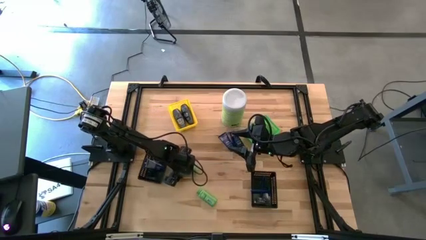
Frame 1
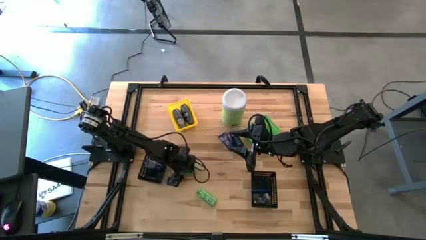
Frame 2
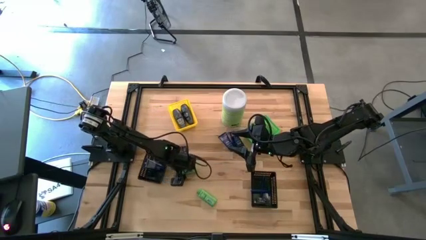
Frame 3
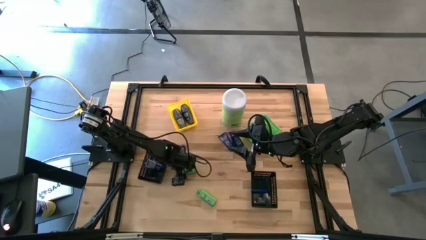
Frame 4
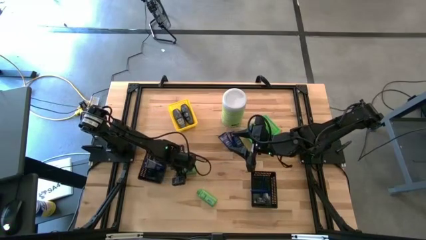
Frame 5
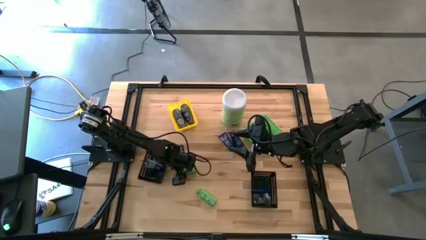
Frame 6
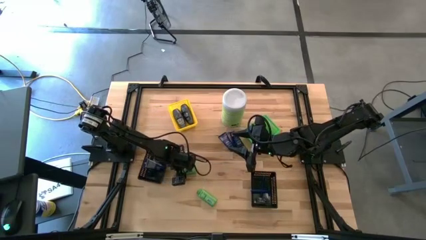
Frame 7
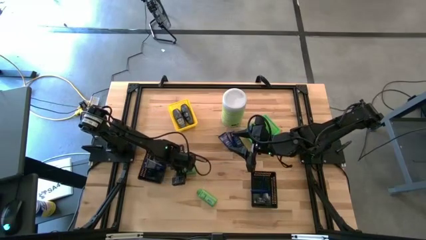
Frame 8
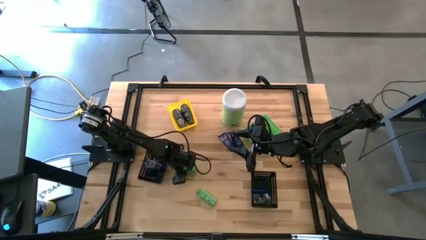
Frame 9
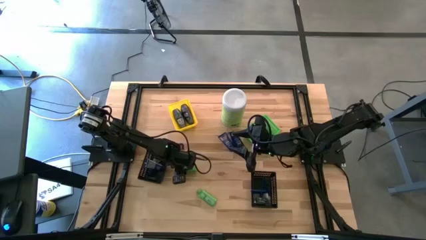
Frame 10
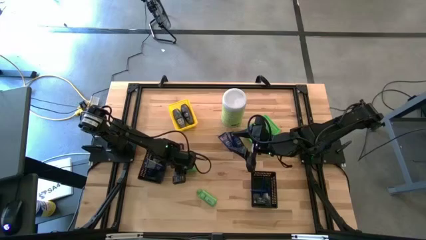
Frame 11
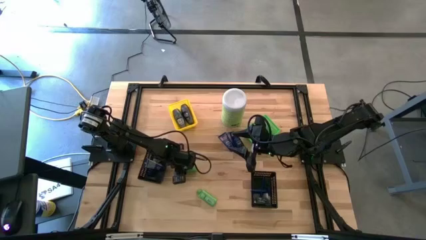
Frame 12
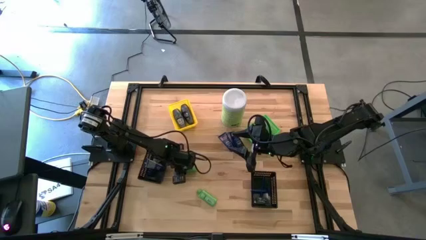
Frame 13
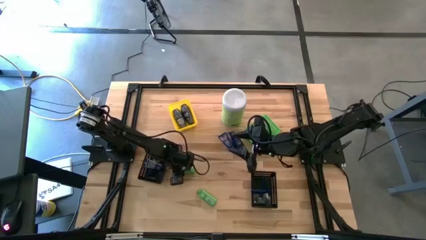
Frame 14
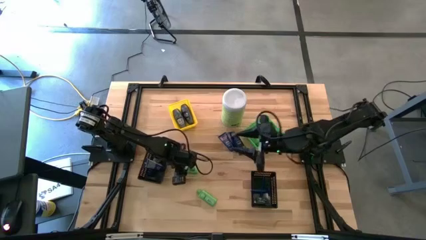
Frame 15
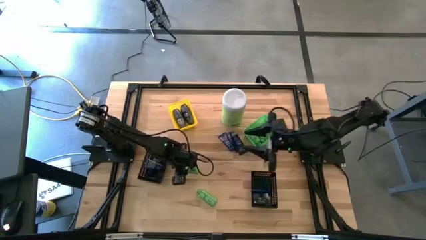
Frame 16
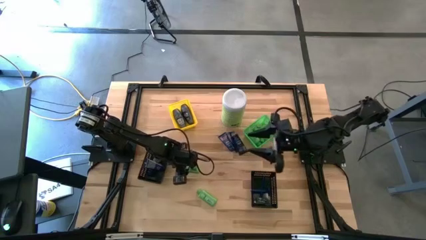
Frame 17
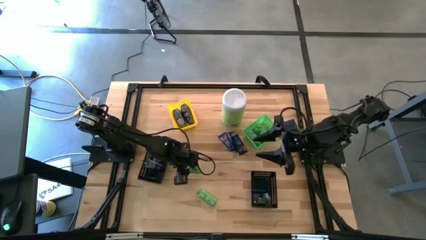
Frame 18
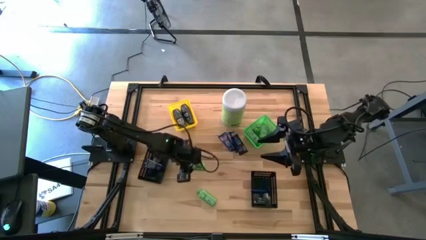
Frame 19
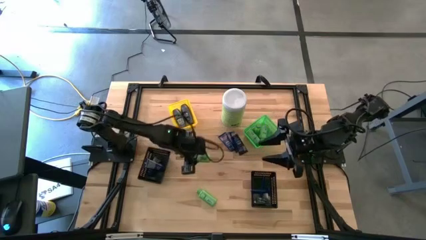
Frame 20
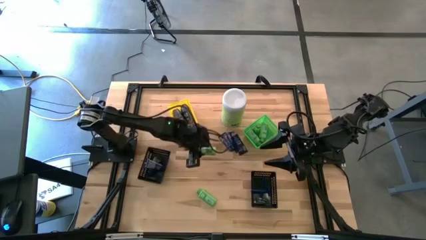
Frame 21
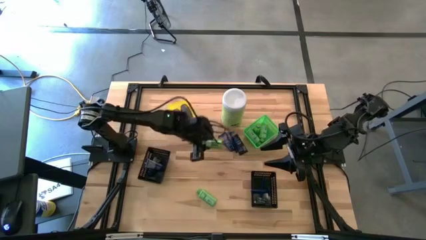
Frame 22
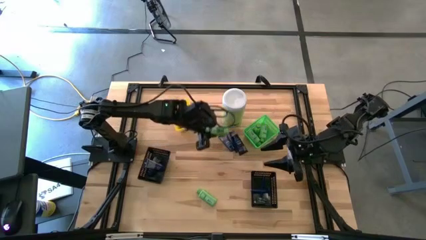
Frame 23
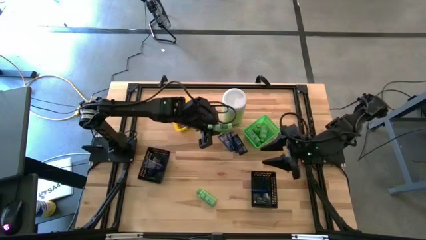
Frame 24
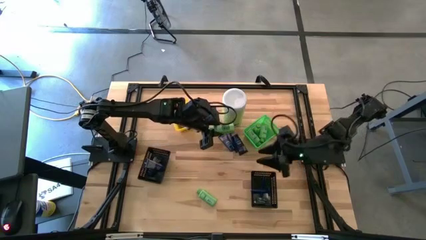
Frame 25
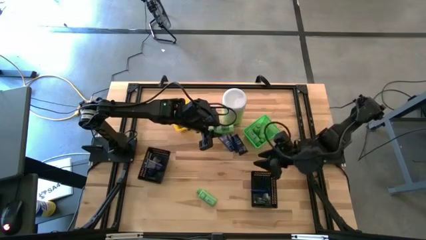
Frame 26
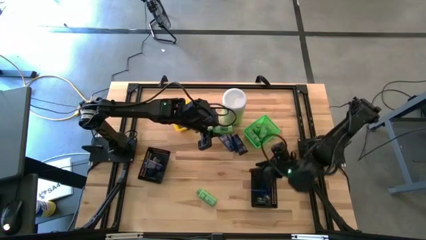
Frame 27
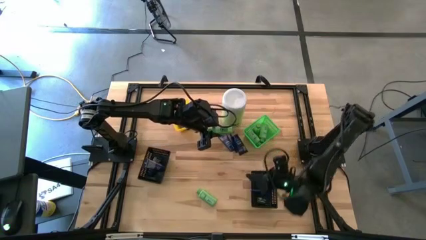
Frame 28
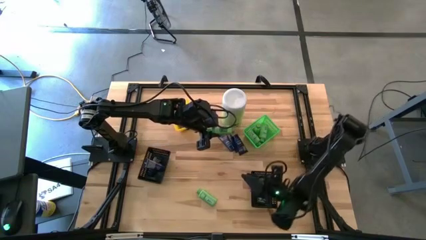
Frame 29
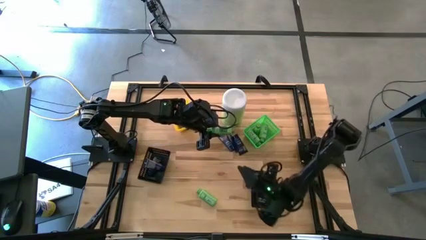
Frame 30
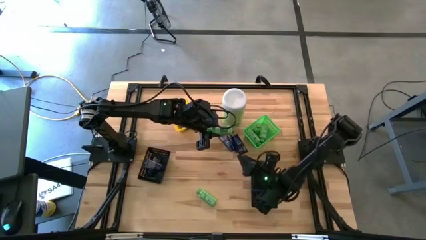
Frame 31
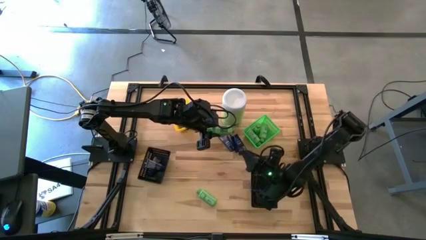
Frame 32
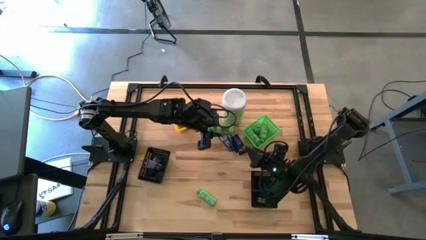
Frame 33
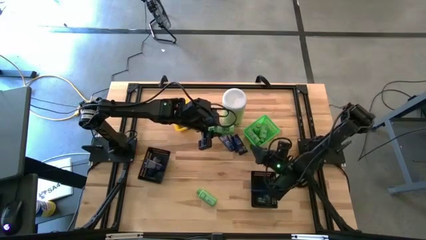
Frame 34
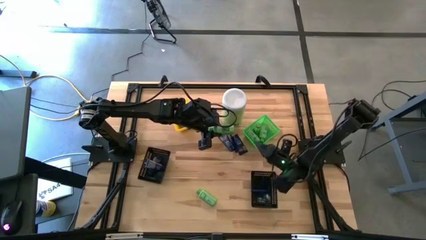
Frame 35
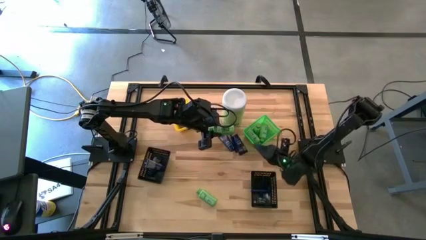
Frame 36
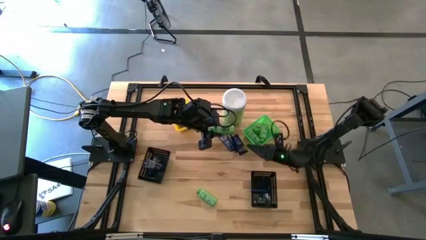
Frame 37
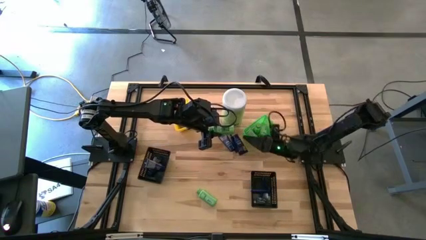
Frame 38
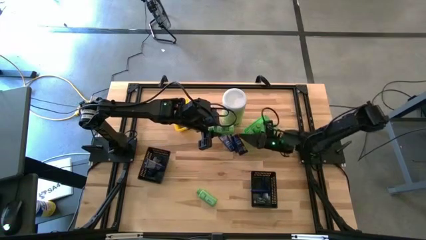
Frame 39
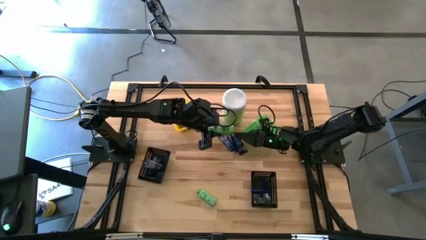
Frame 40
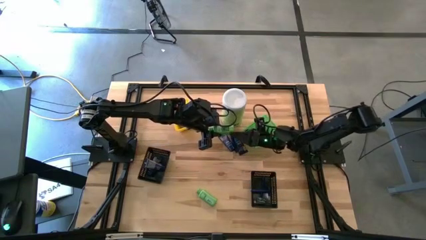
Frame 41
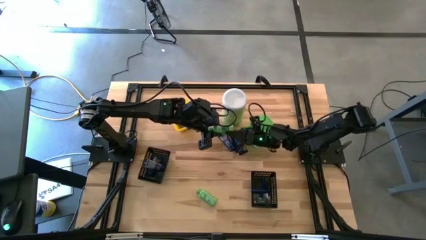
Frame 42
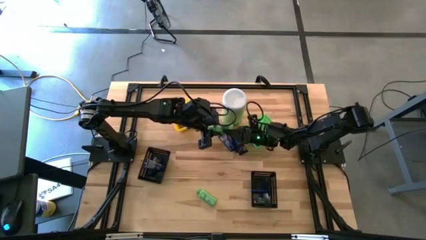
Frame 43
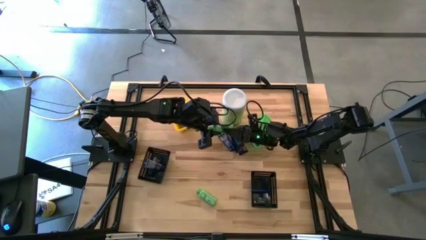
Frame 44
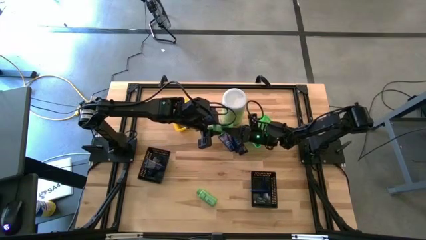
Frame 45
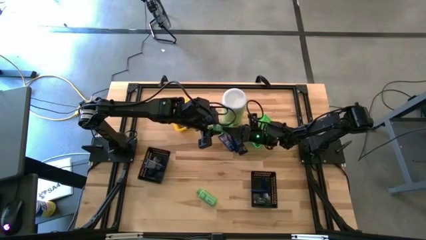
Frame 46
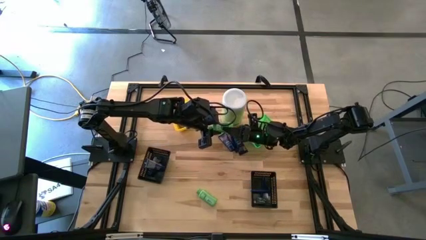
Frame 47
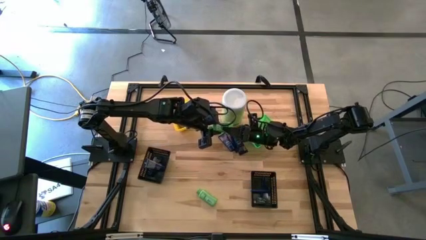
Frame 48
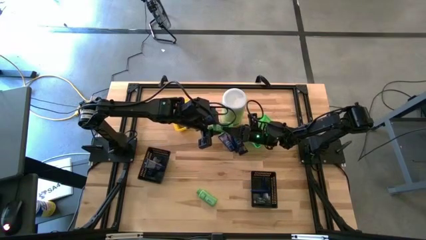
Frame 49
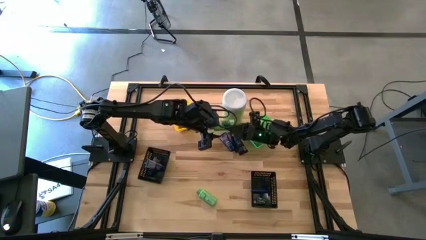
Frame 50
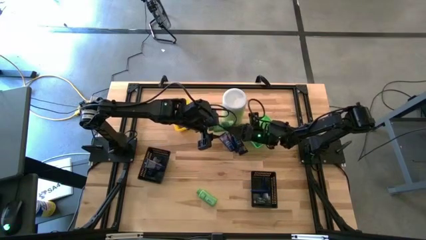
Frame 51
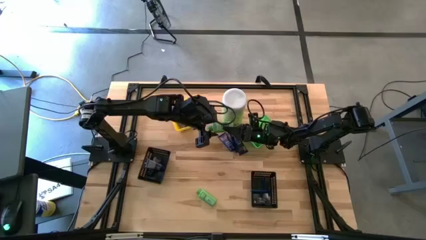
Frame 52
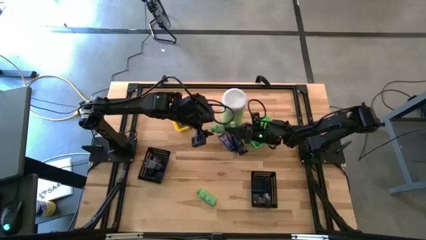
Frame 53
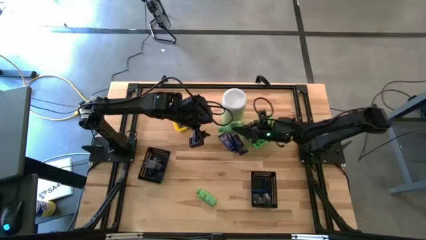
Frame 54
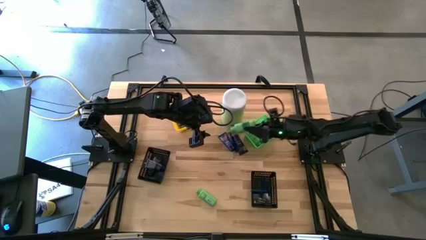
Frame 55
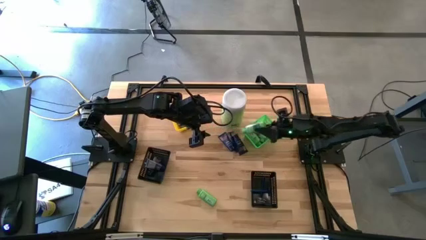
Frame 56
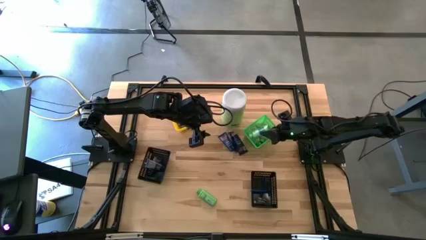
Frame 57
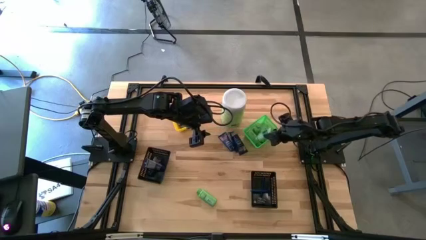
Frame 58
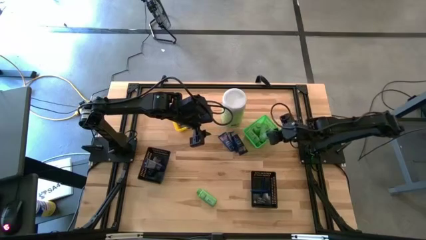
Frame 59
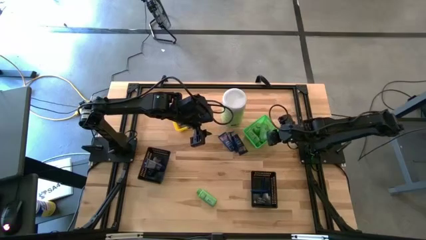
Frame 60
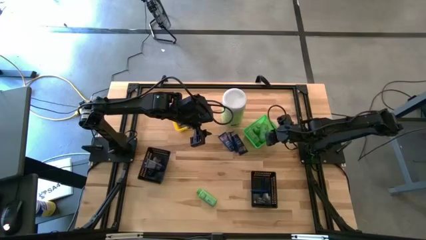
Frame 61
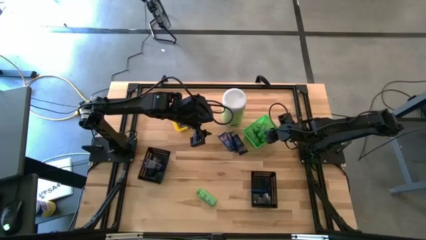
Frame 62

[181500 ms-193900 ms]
Task: Pick & Place Travel size toiletries
Put the shampoo bottle bottle into the green bin

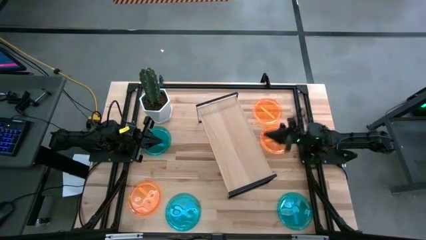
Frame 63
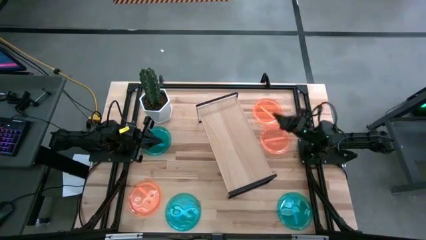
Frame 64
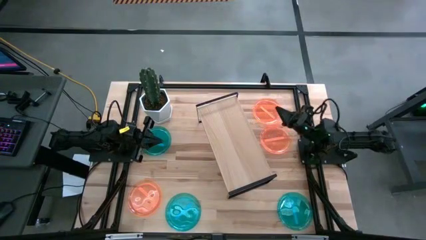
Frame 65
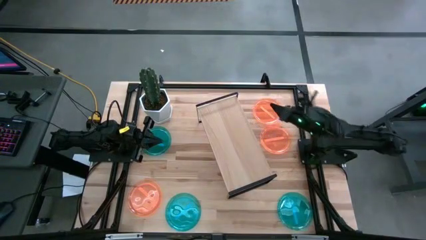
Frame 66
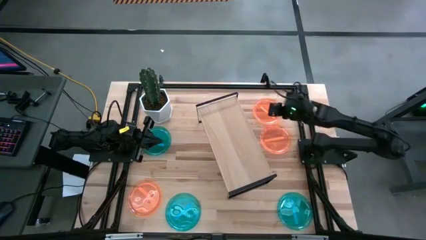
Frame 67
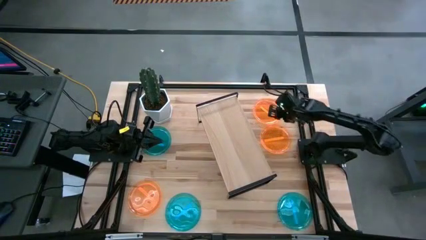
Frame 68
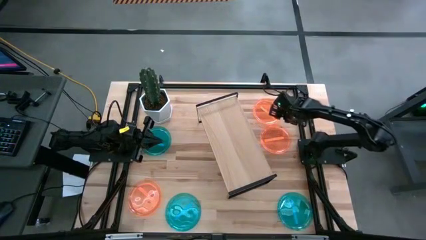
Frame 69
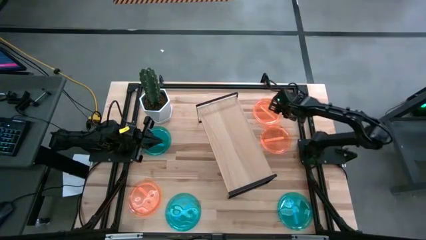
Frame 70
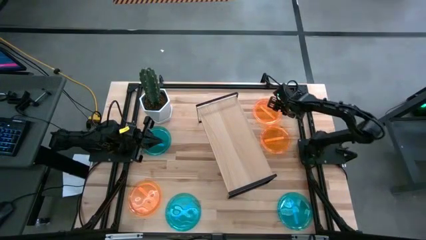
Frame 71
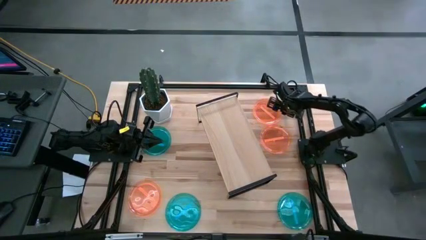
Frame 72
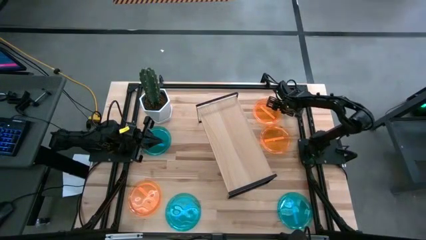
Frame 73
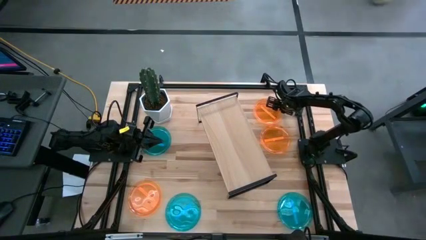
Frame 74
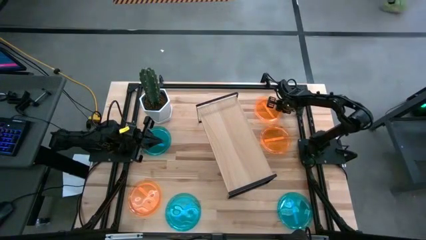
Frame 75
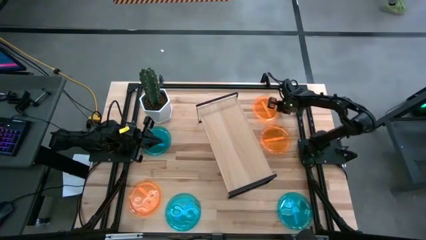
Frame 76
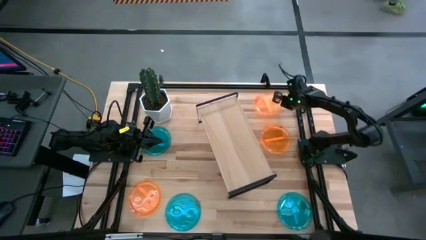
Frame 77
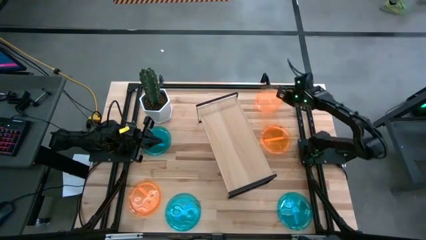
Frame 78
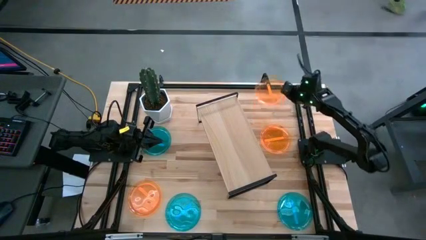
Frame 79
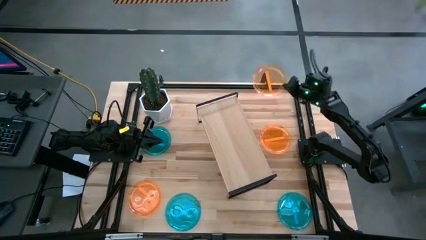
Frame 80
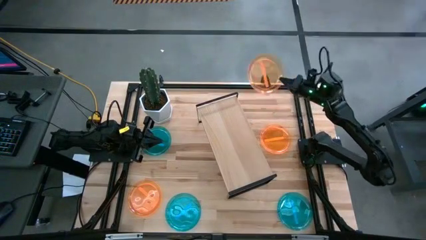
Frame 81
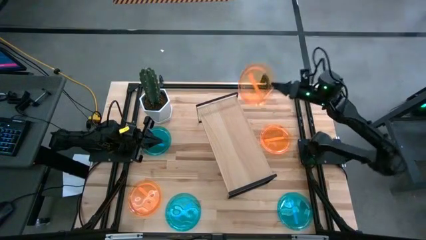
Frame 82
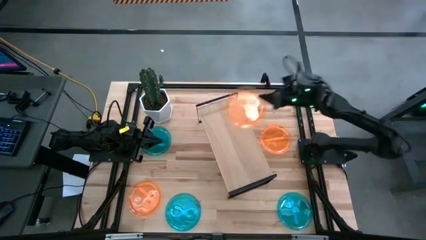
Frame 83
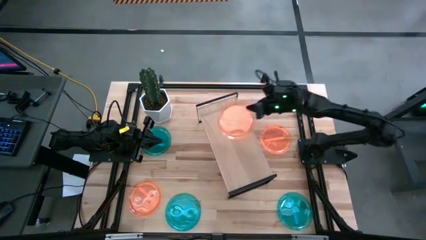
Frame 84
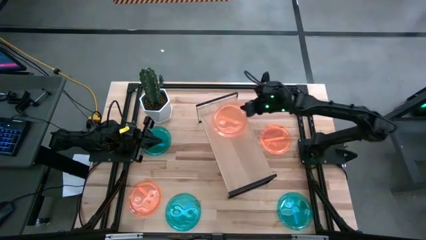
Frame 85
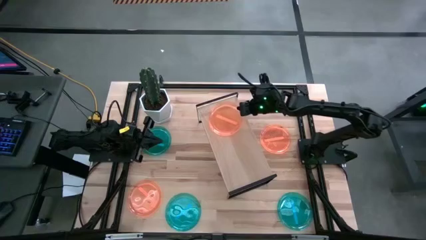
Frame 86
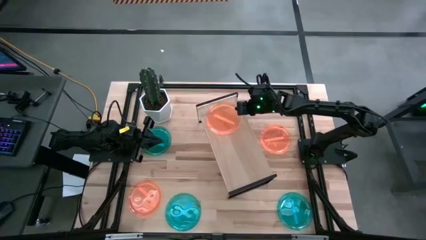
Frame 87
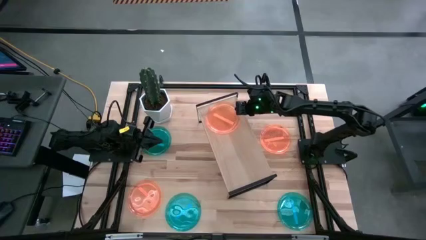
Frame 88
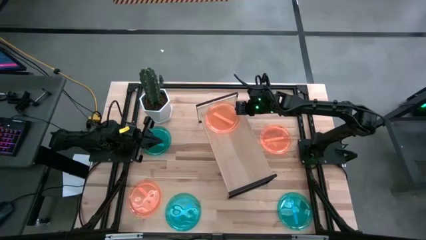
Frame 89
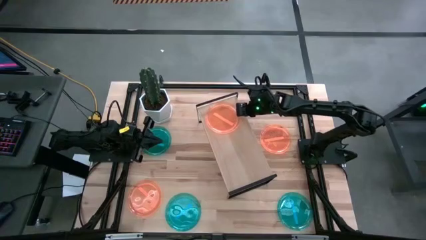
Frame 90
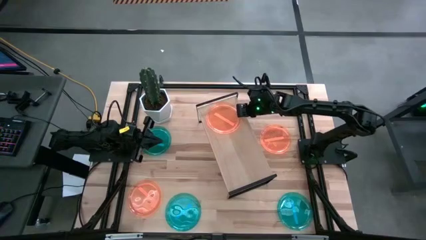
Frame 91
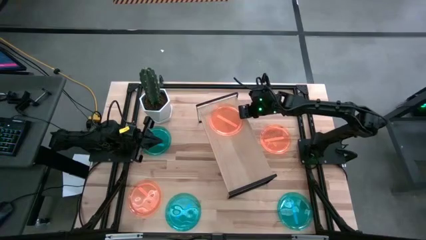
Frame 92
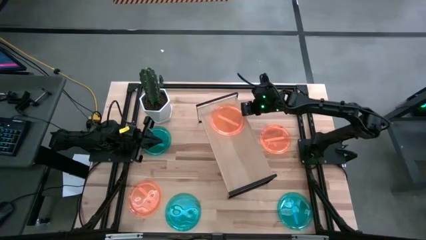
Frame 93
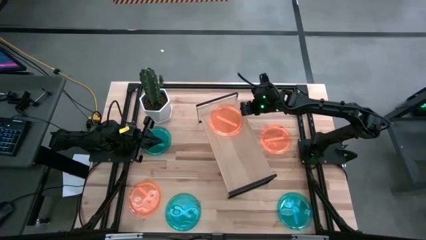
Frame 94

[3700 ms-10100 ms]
Task: Place and stack plates onto a shelf
Put the top orange plate on the shelf
